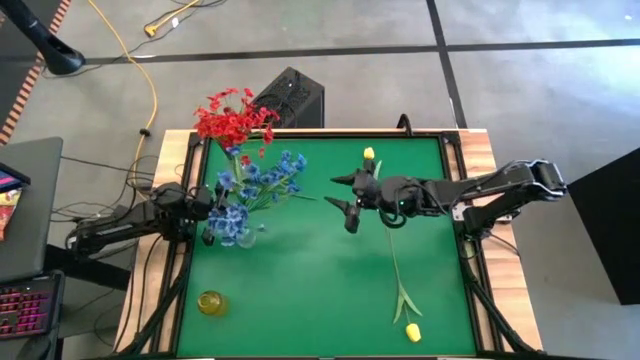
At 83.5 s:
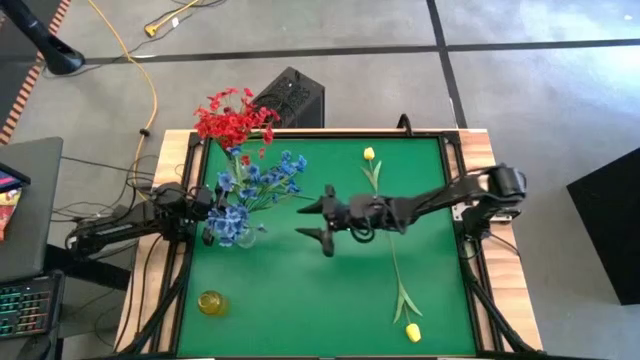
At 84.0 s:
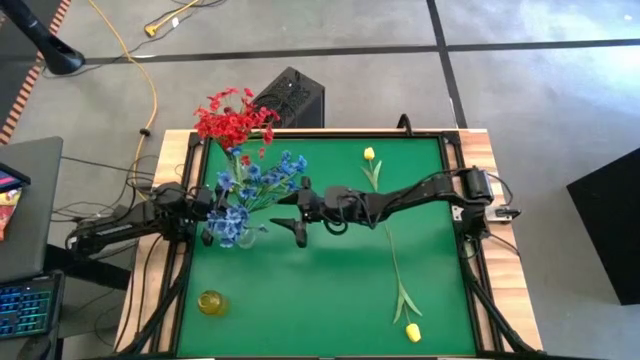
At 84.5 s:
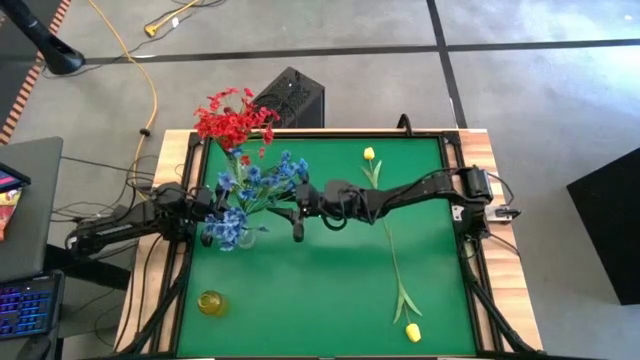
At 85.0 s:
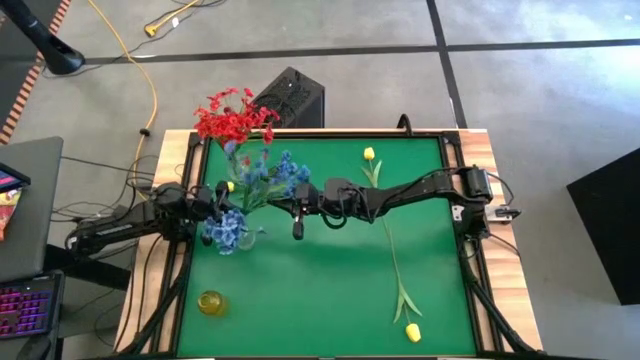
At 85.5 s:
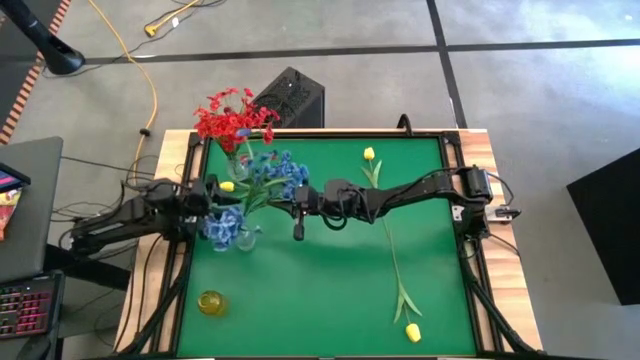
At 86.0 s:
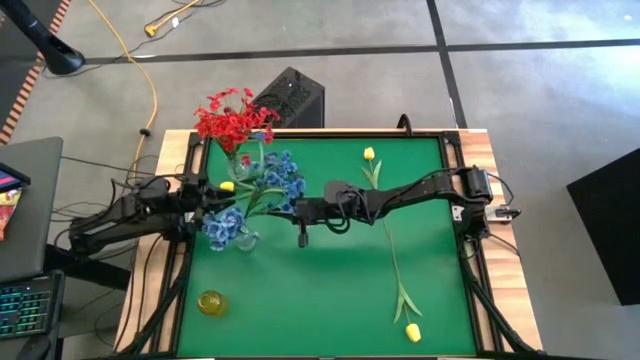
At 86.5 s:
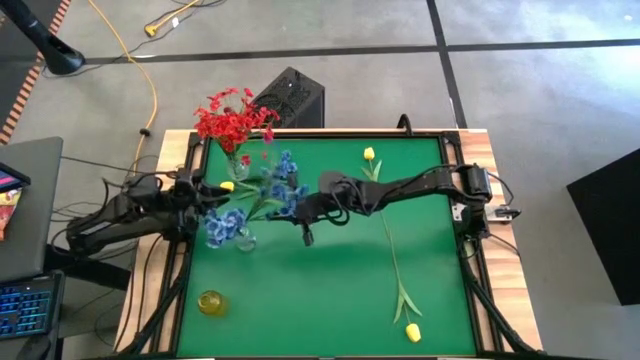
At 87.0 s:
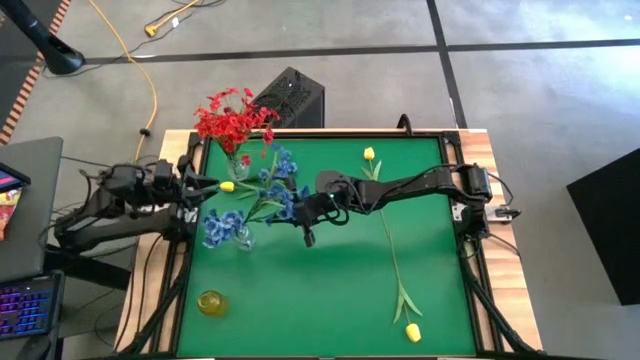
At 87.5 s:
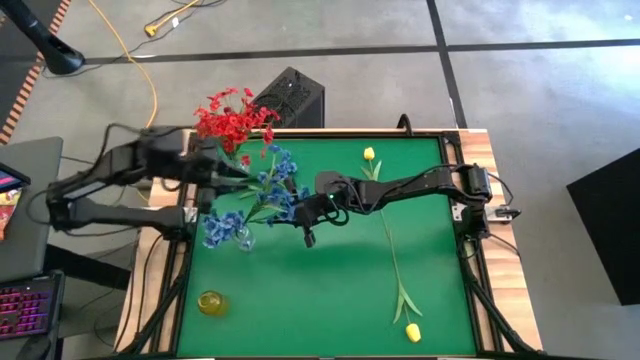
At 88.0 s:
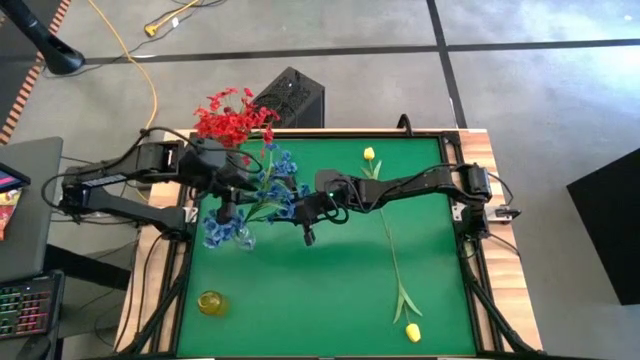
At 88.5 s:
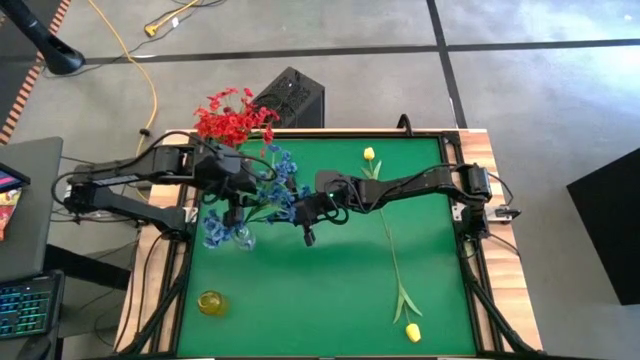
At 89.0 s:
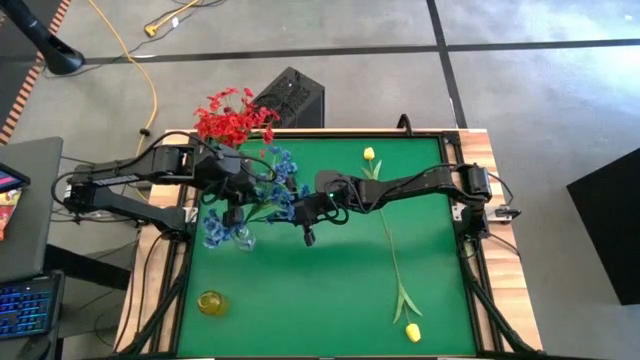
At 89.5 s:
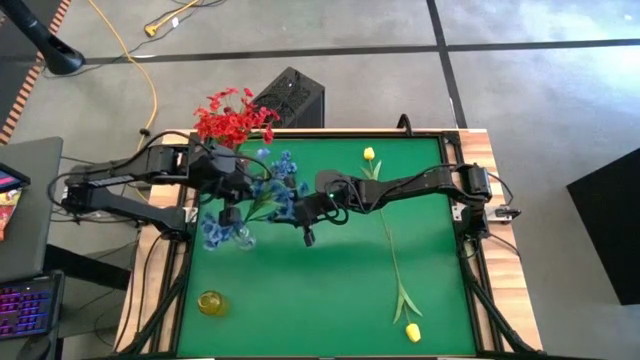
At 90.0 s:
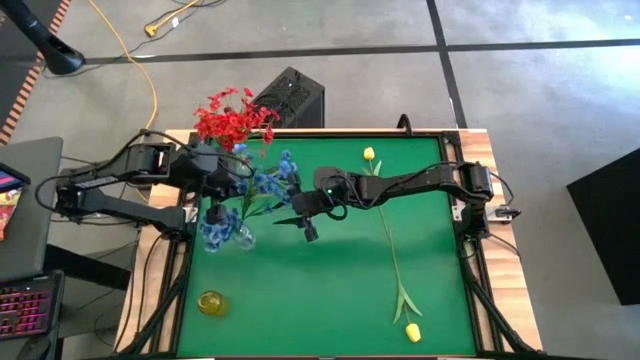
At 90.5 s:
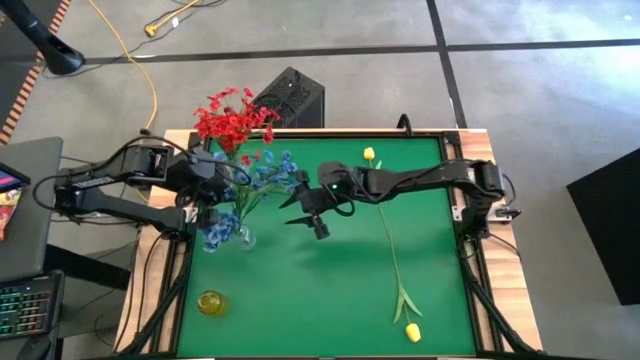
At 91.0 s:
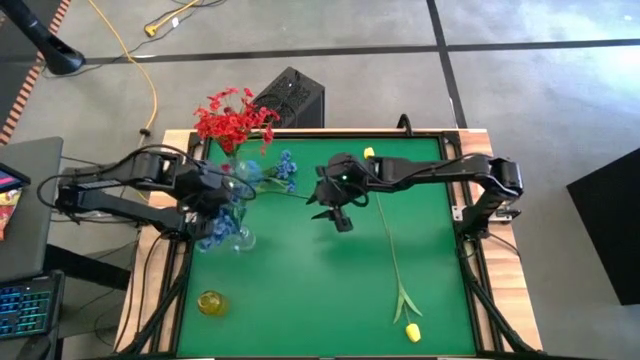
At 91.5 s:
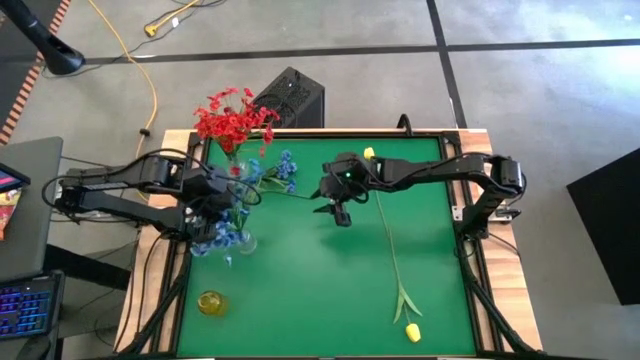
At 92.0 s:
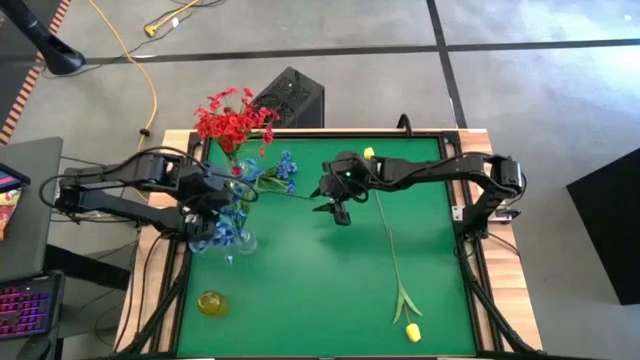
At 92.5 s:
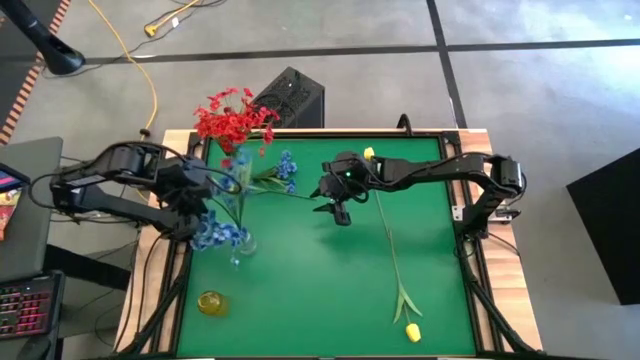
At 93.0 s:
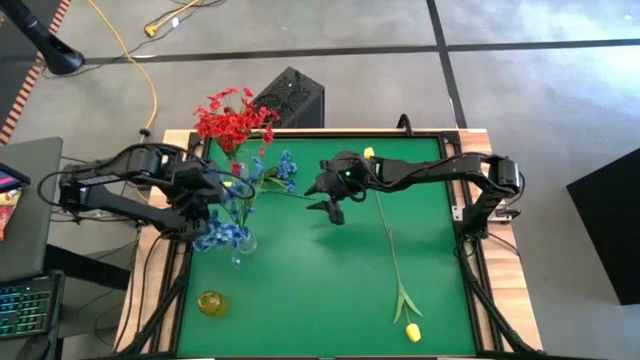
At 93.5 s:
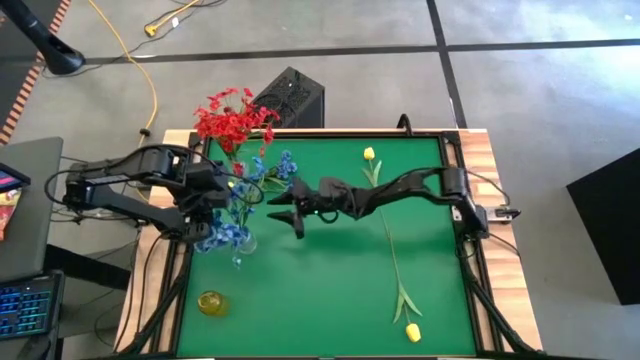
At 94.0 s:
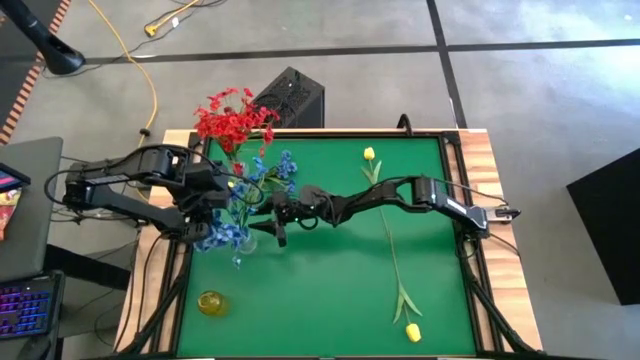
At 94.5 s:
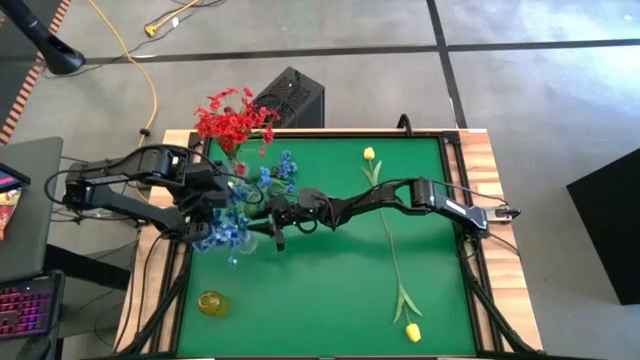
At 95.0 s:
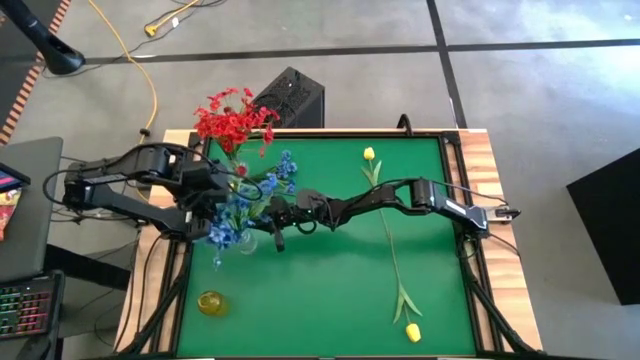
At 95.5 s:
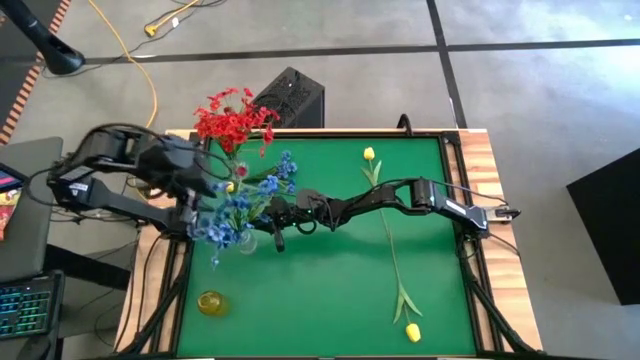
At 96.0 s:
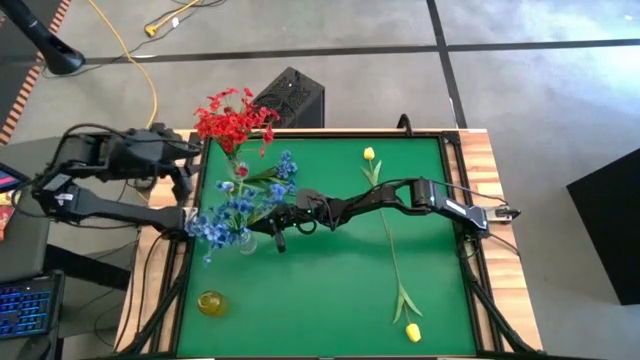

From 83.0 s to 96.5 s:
Task: Sort flowers into vase by color
Put the bottom blue flowers into the bottom transparent vase

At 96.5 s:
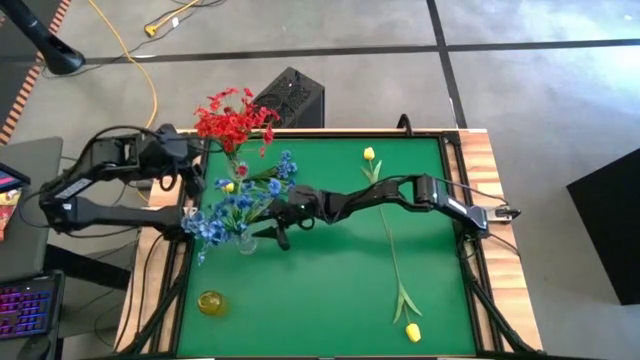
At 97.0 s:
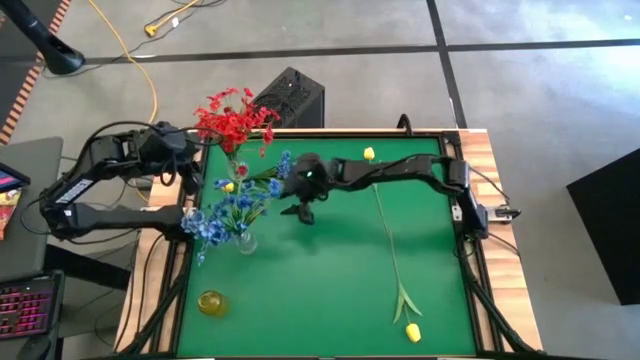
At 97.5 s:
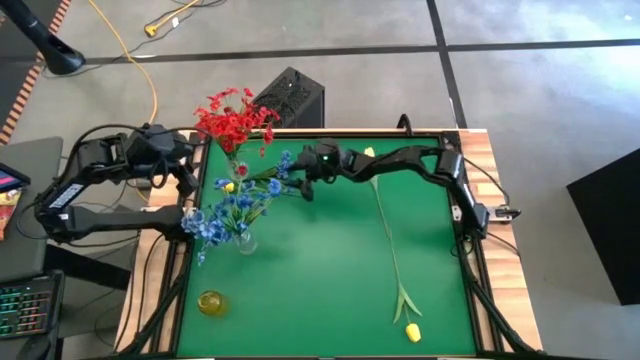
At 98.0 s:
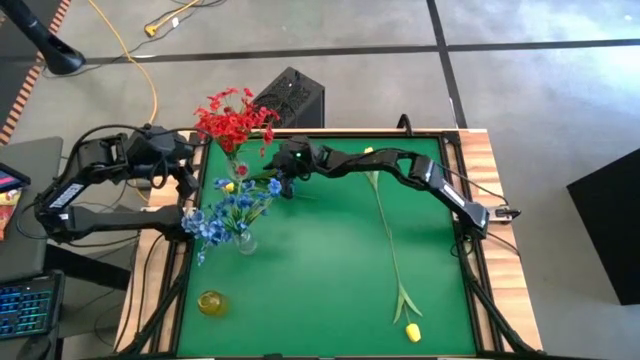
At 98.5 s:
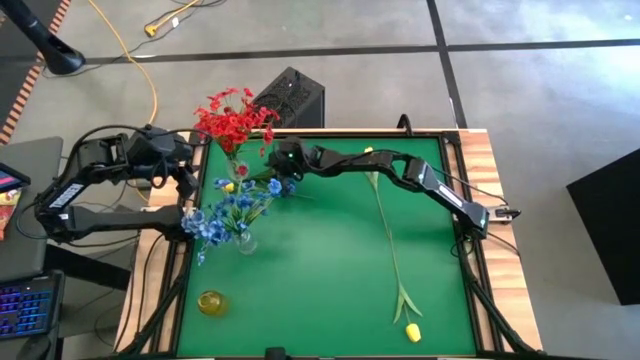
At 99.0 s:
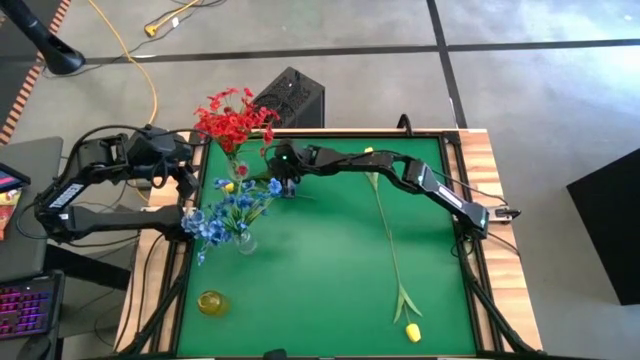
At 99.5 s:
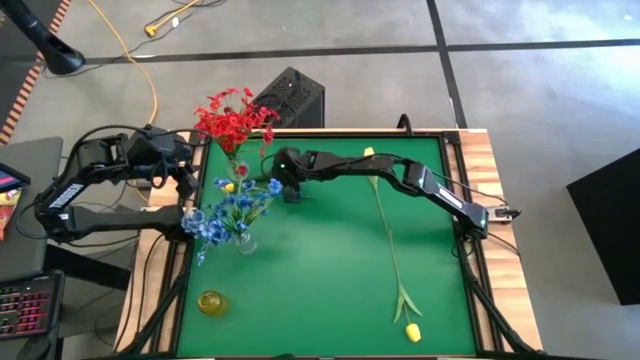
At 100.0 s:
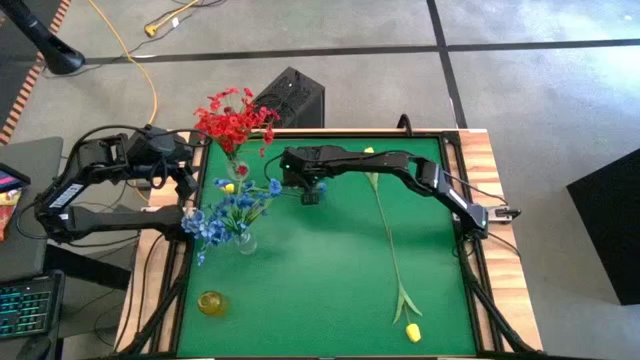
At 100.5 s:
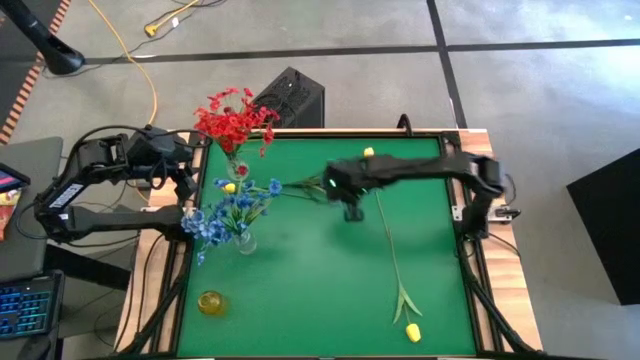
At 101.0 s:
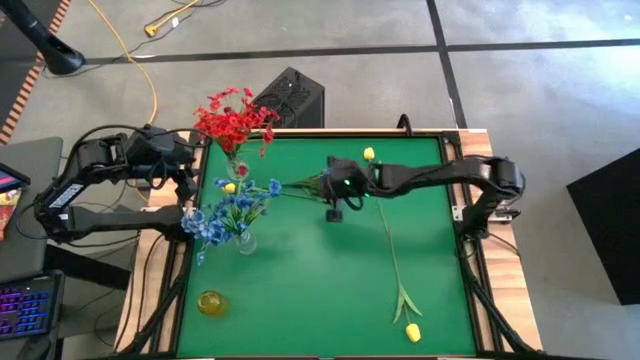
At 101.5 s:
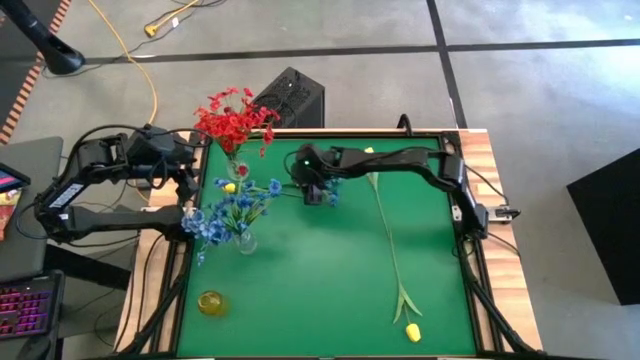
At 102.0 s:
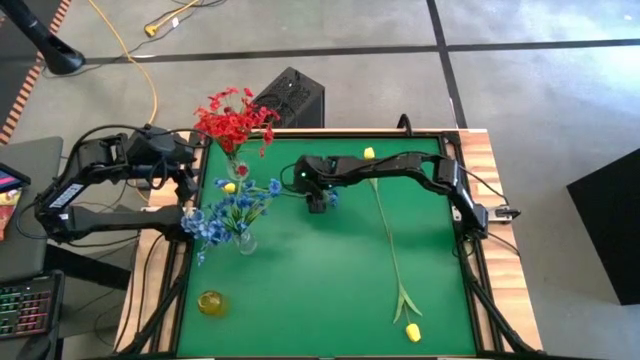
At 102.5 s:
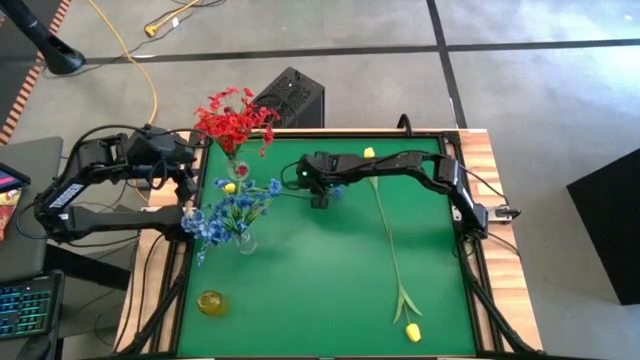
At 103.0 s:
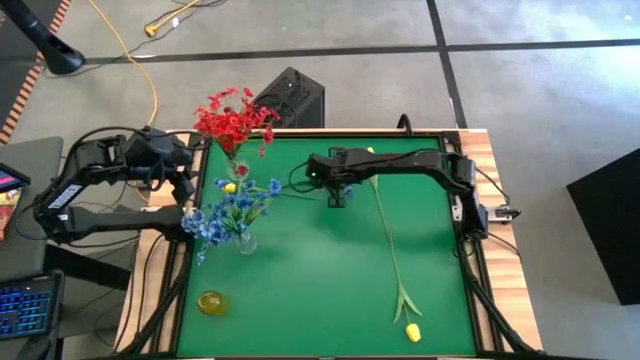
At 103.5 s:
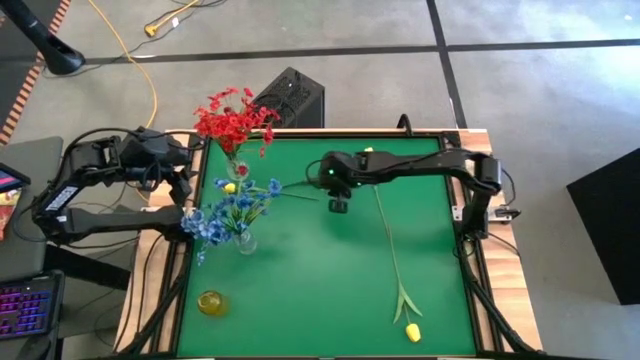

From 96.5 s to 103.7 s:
Put the blue flowers into the bottom transparent vase
